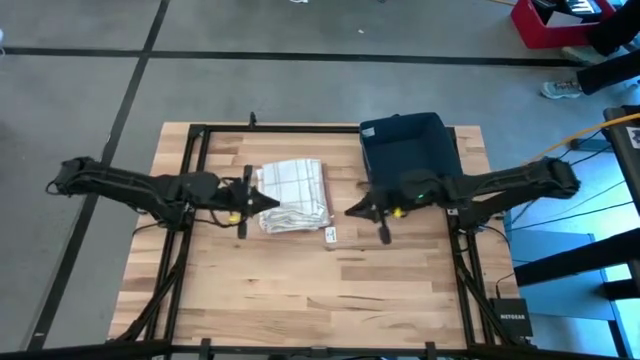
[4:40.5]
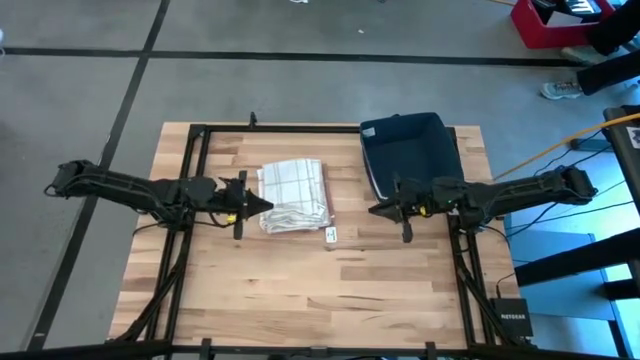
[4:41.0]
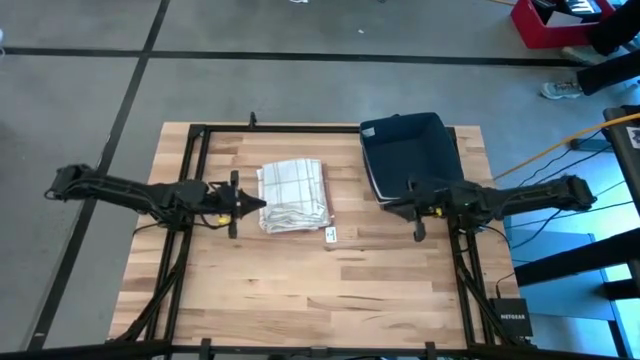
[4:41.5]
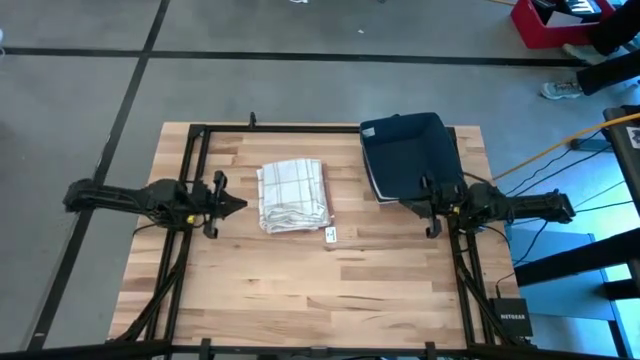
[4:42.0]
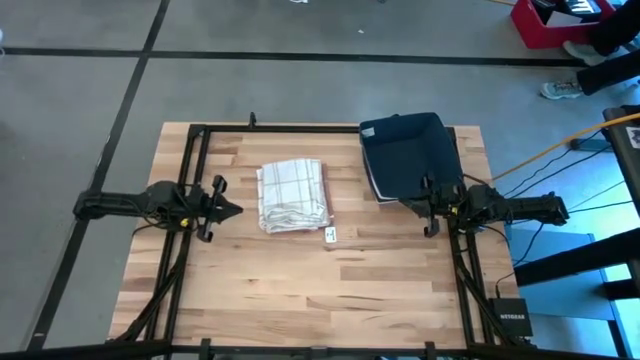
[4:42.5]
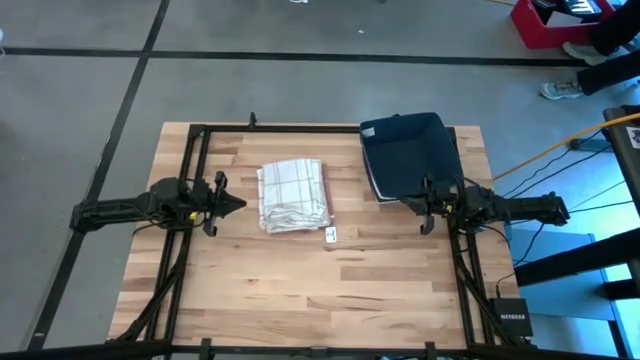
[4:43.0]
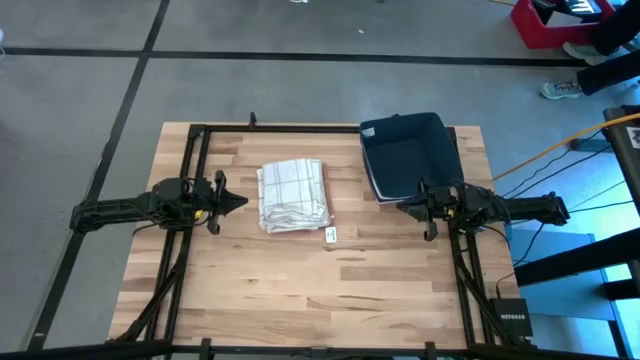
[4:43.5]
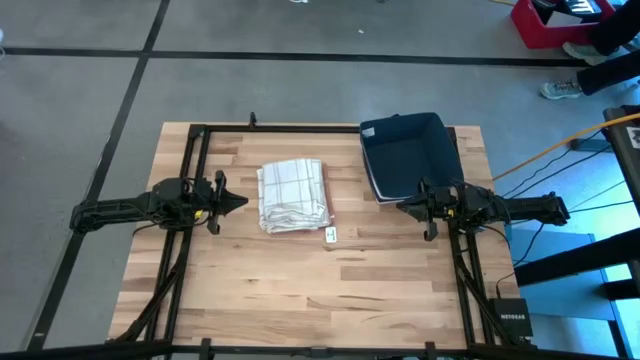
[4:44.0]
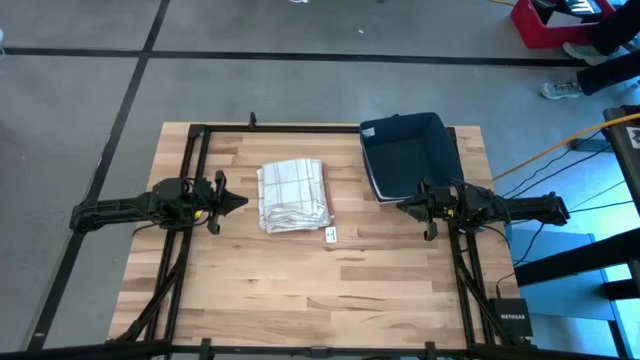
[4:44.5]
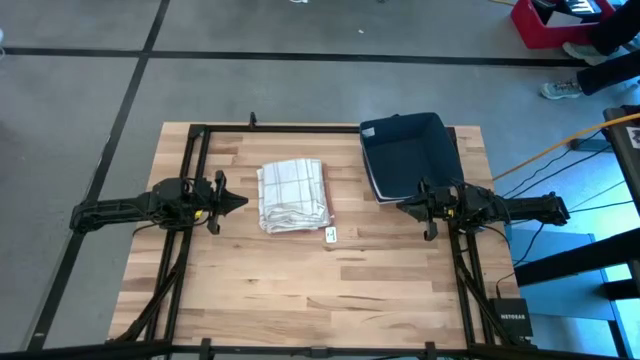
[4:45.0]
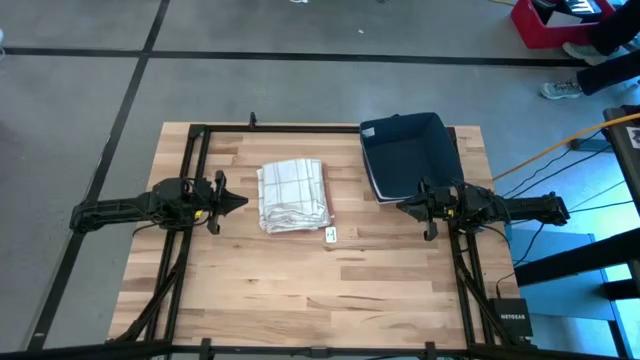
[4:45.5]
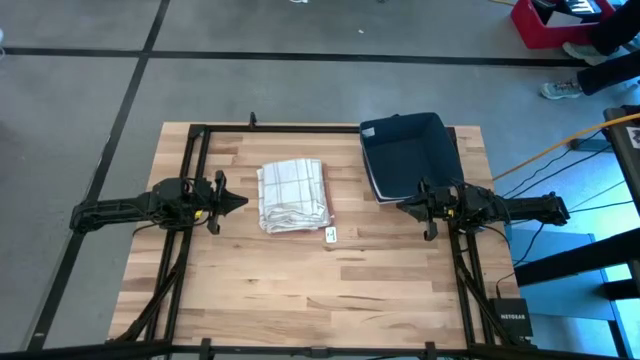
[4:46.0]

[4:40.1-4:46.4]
Task: Fold towel
Return to Home Position

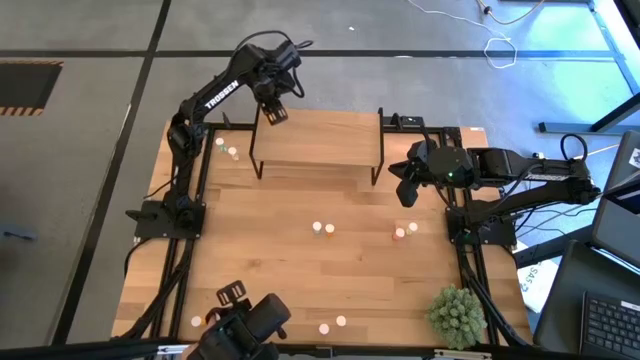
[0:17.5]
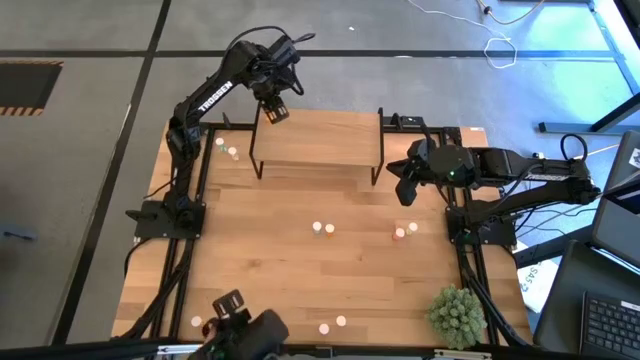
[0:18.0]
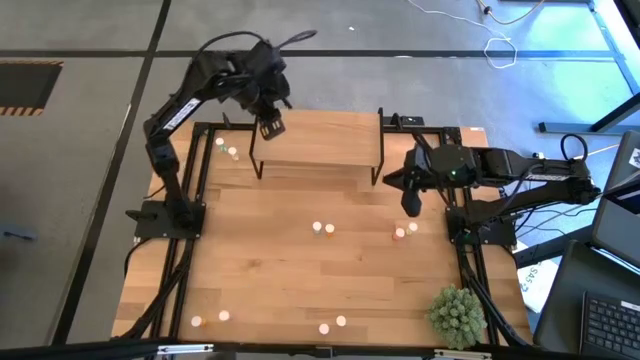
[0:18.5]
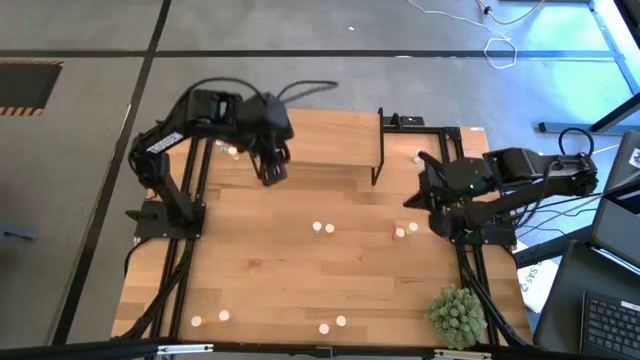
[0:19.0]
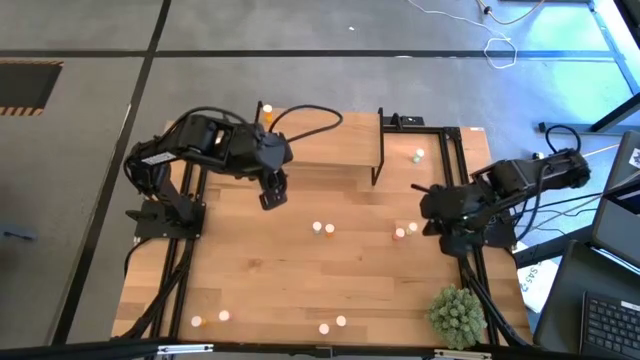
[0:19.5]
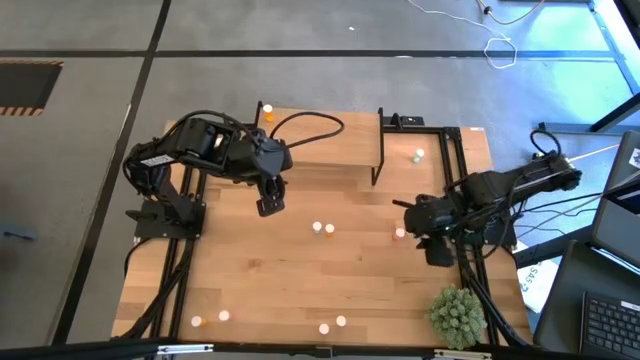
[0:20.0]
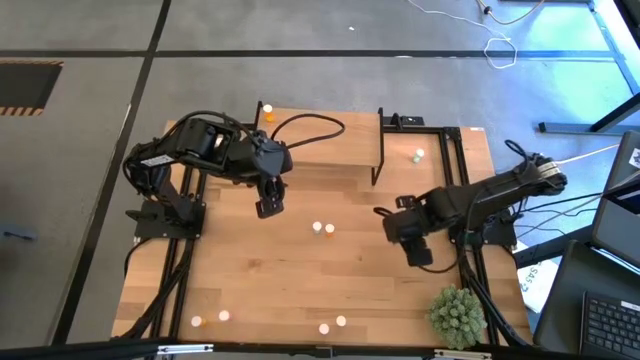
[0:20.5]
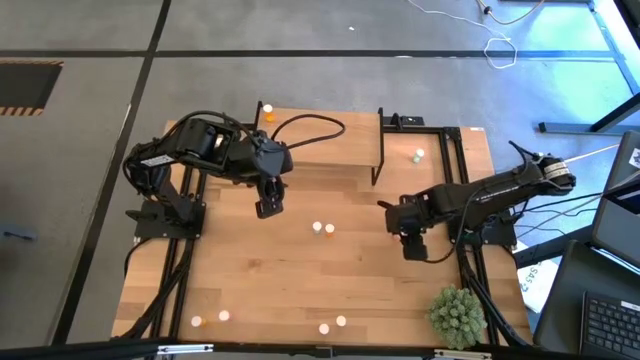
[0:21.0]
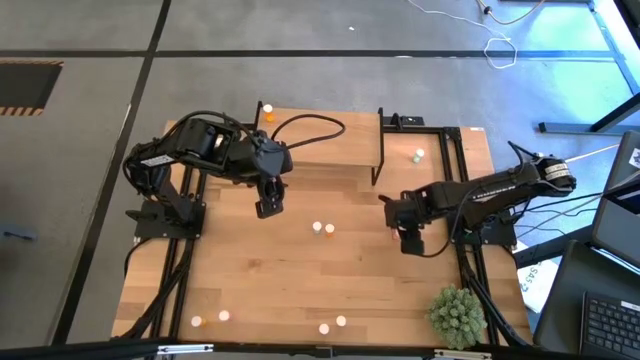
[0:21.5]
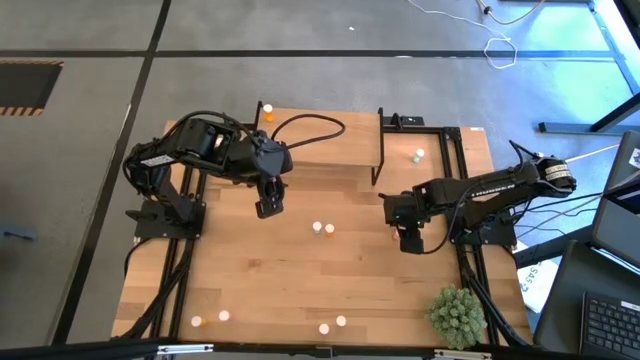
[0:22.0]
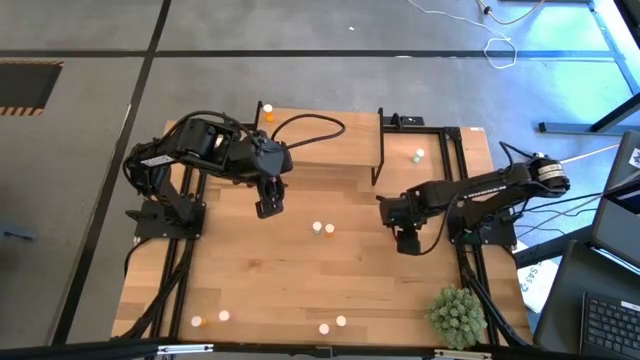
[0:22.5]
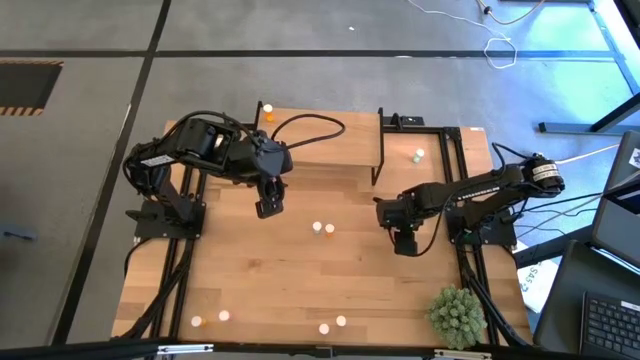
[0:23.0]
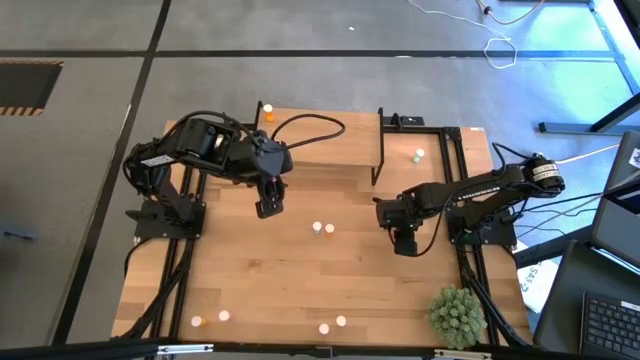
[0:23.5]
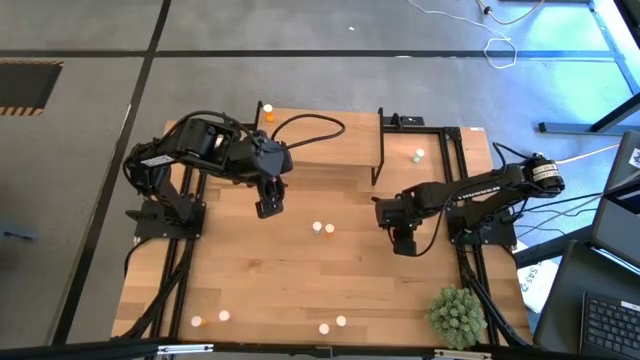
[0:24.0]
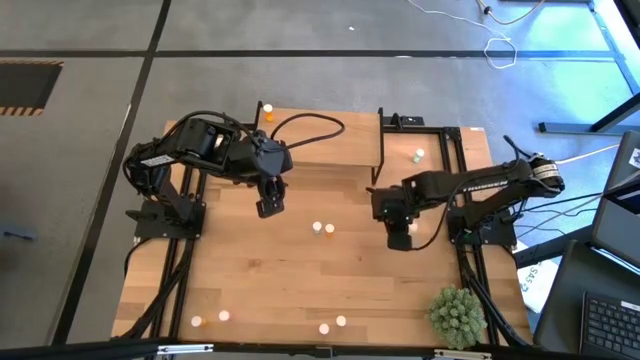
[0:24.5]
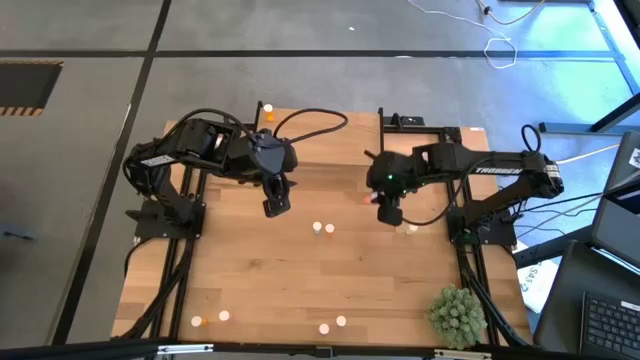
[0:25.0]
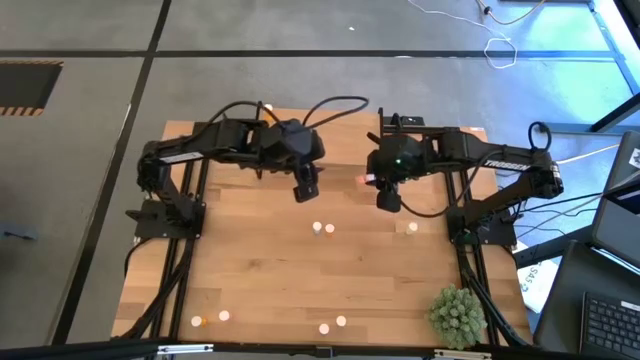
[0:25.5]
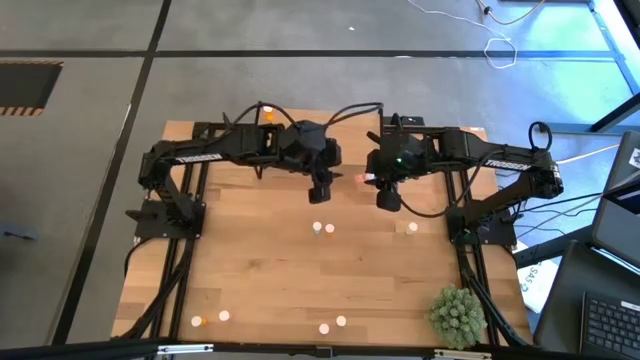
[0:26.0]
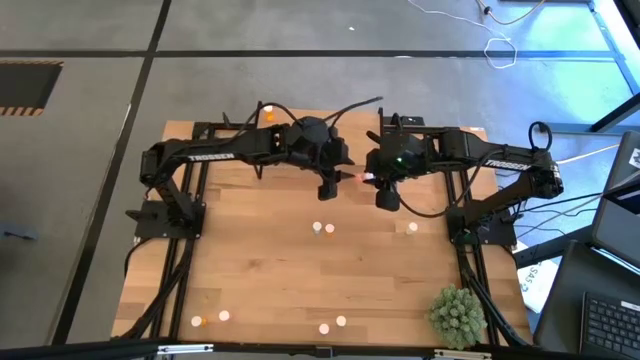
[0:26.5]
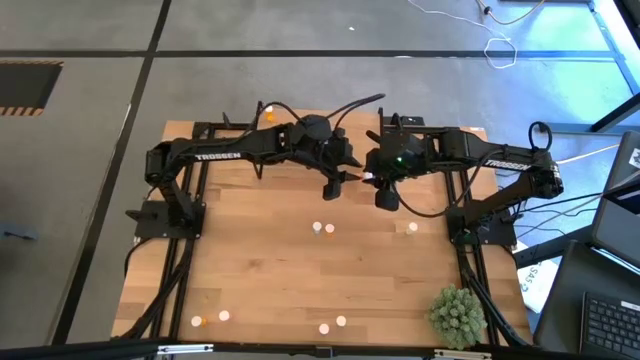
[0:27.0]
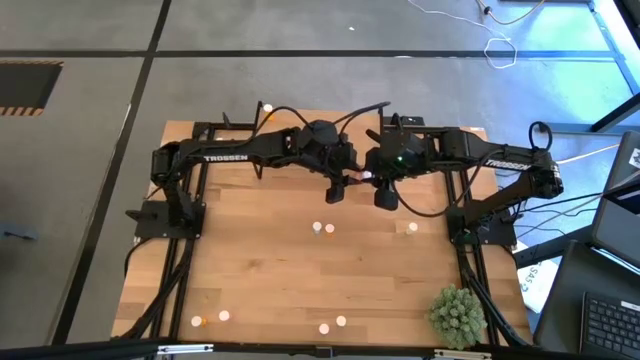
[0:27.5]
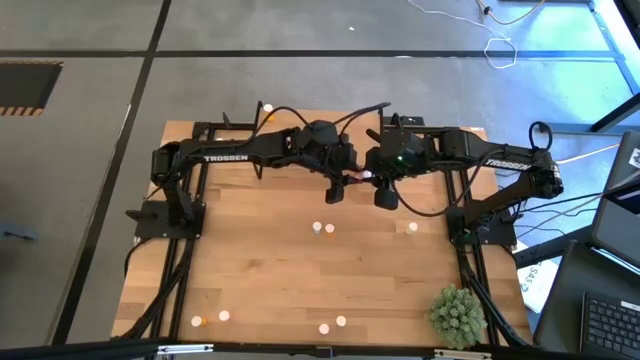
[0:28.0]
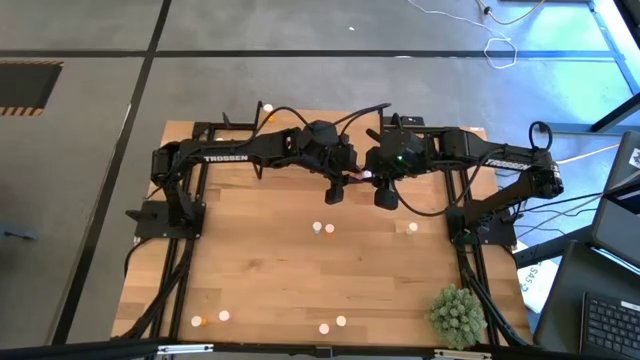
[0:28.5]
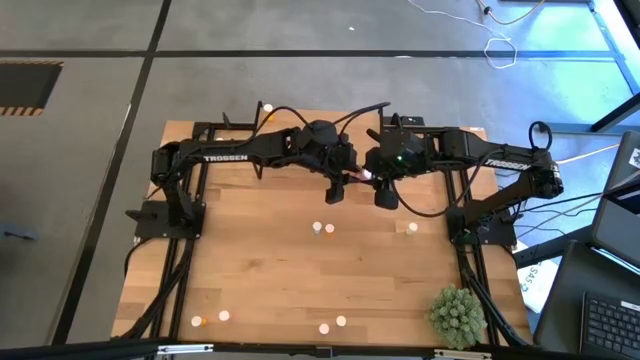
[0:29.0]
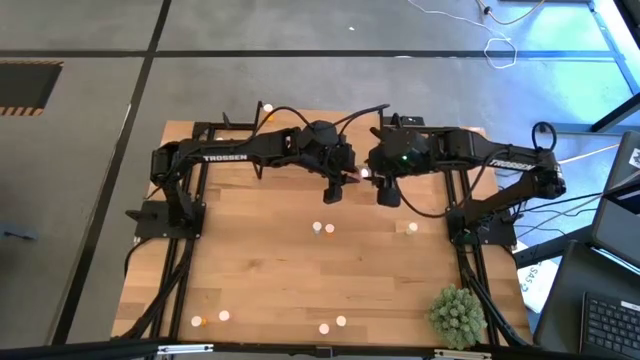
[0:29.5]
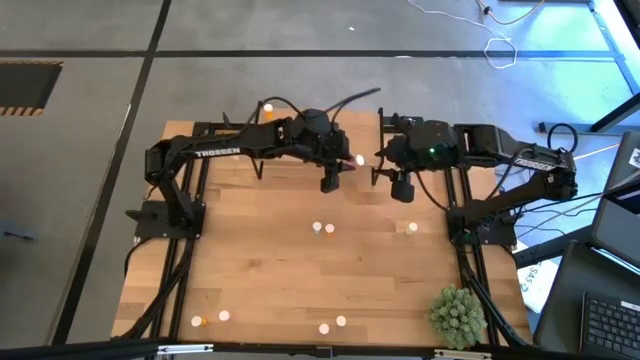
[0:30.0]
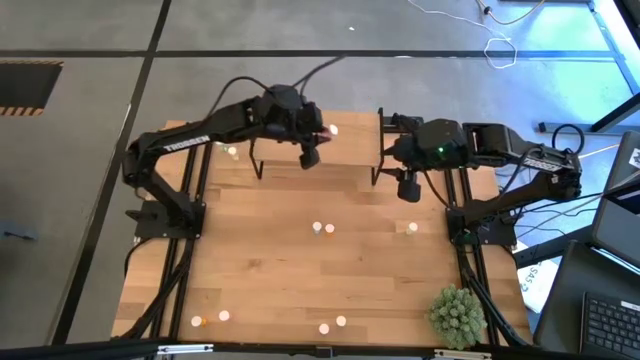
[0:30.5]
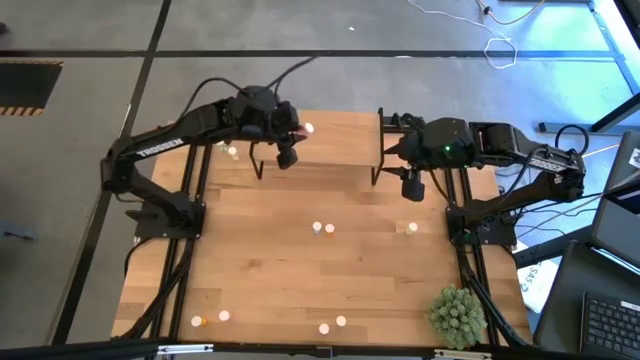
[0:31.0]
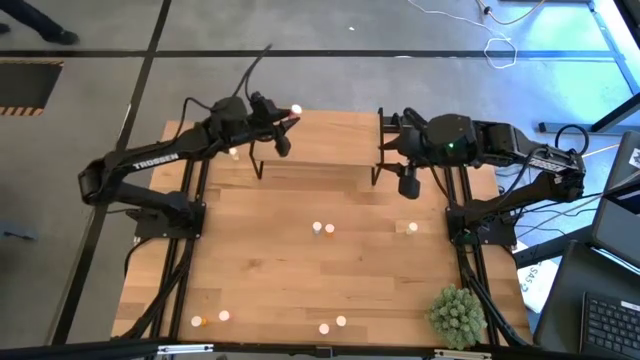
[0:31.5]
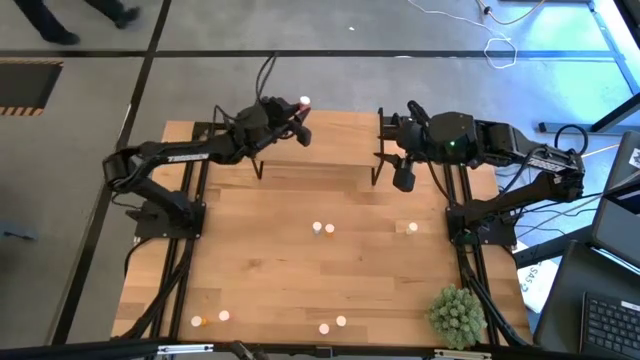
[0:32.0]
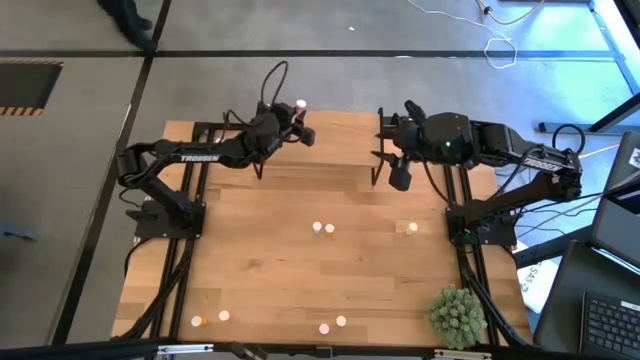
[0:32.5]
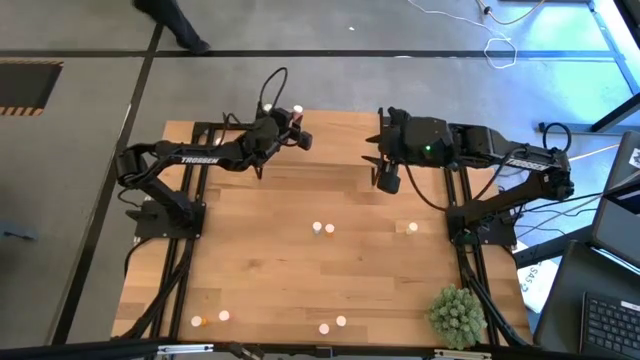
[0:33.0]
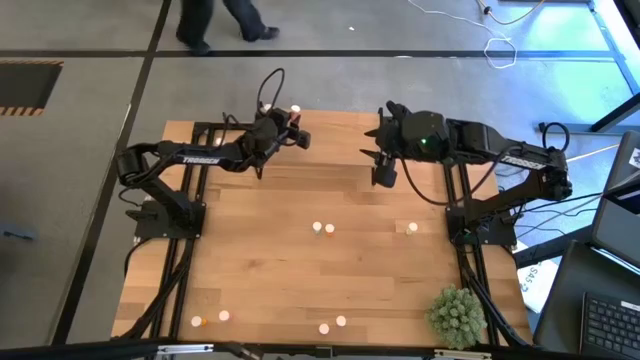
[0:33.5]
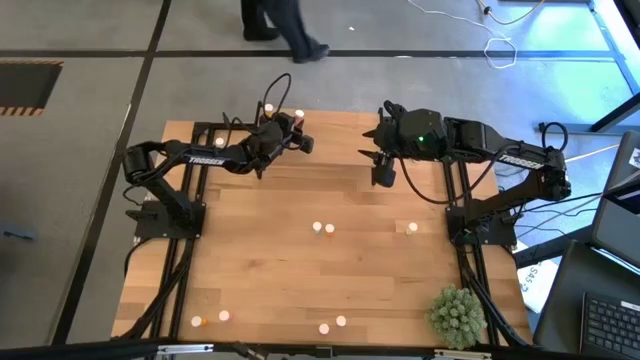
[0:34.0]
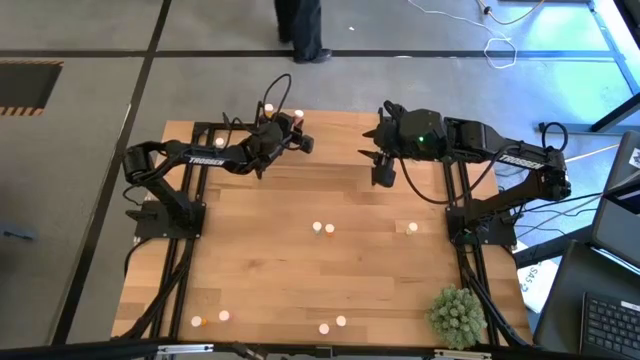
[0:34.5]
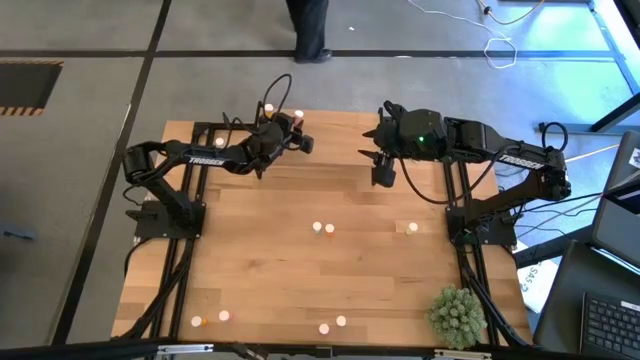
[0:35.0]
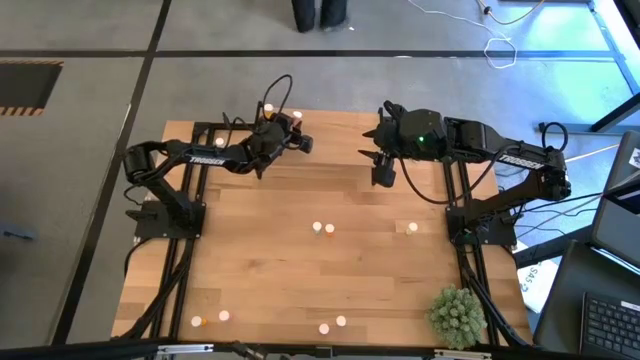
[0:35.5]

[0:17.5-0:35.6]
Task: Pick and place medicine bottles onto shelf by color
Put the top right pink pill bottle on the shelf
